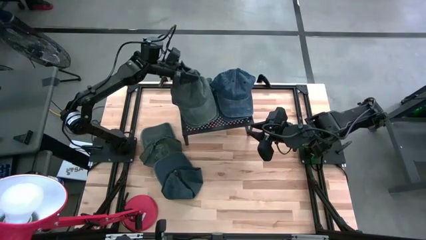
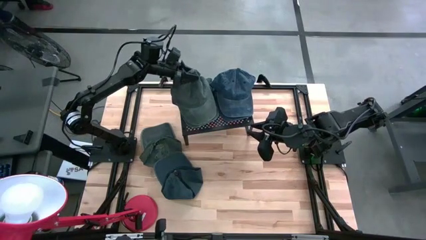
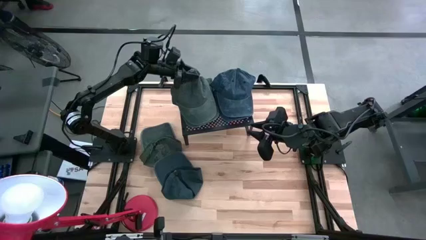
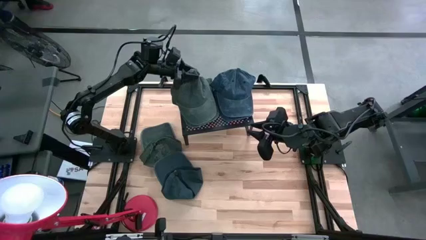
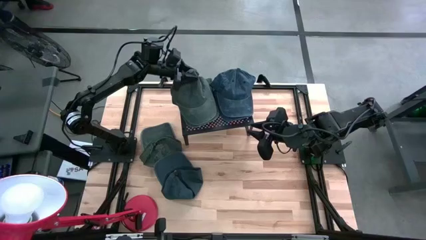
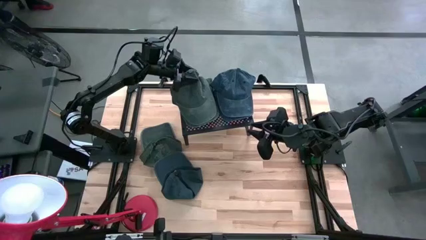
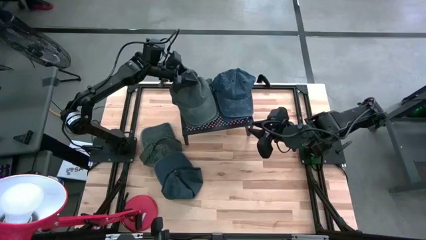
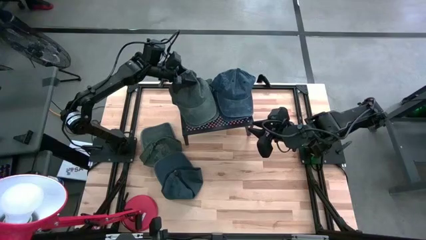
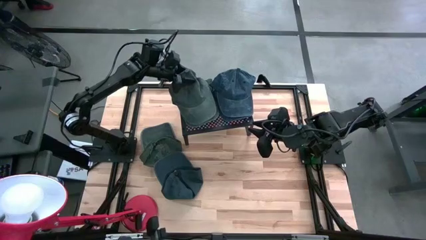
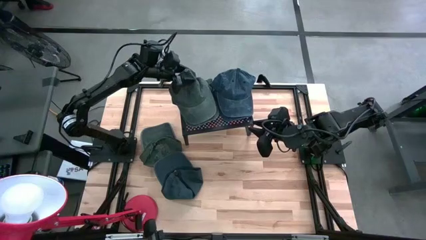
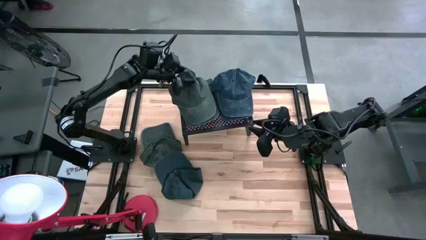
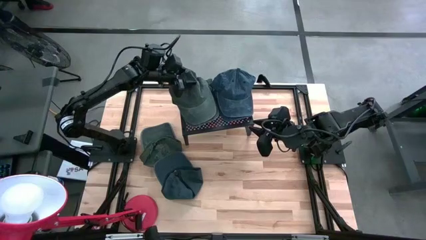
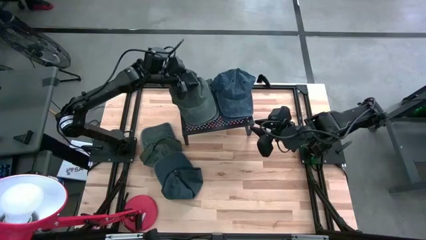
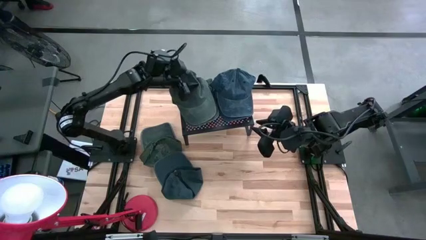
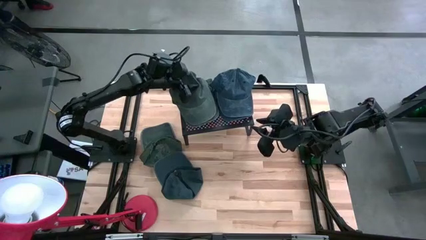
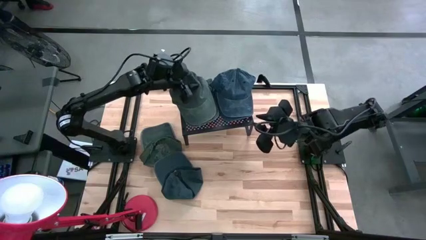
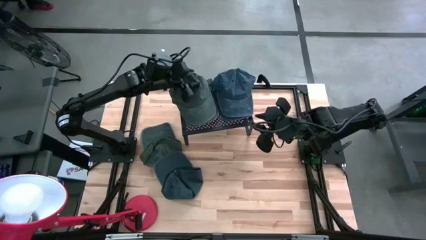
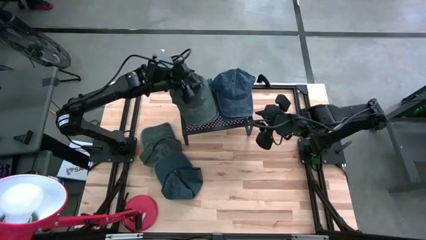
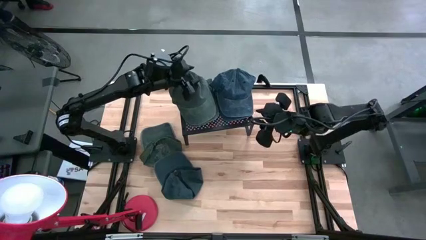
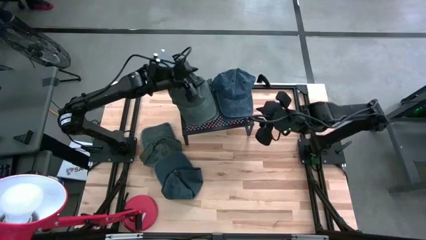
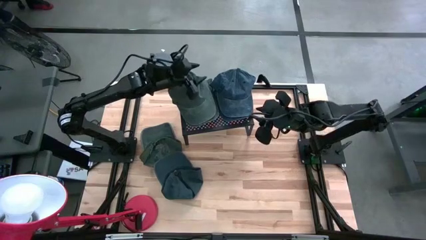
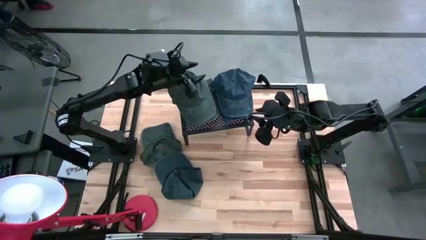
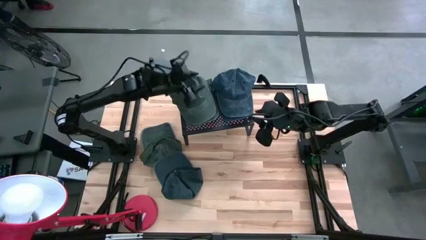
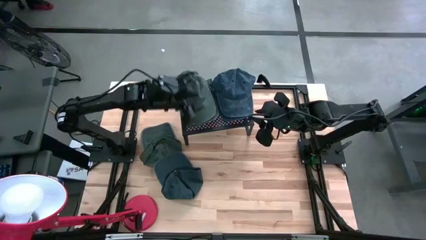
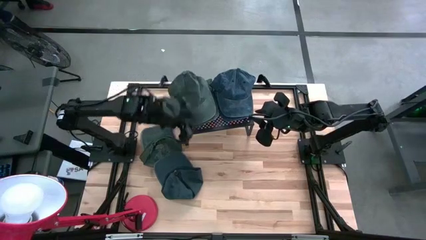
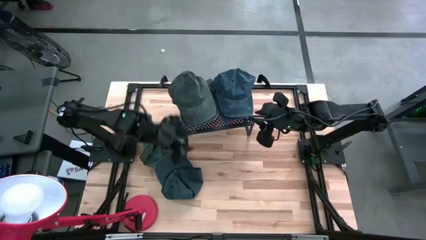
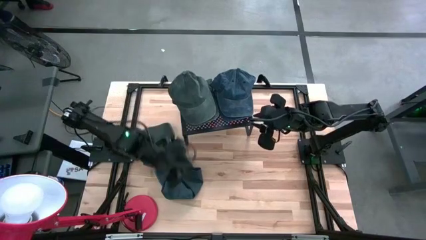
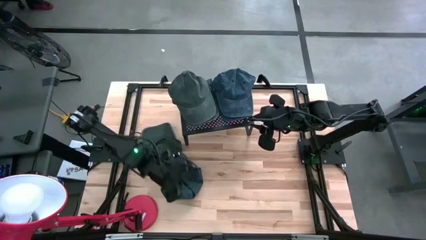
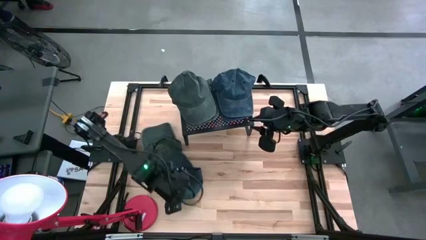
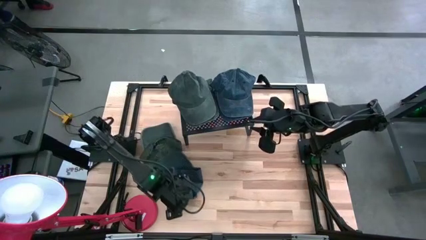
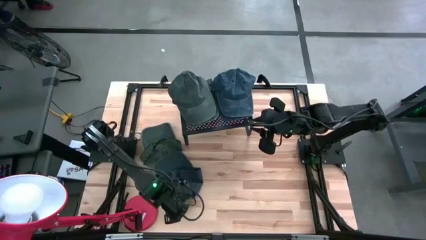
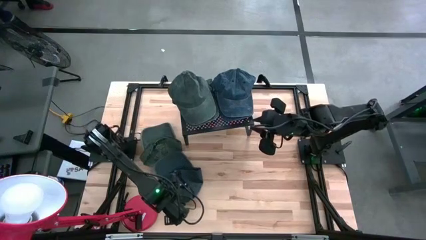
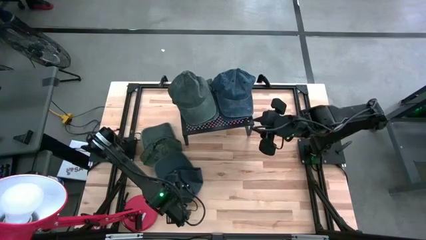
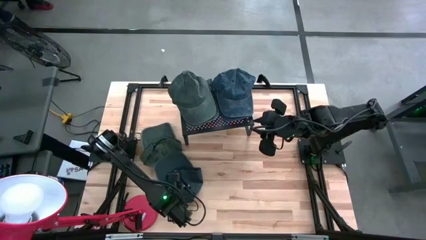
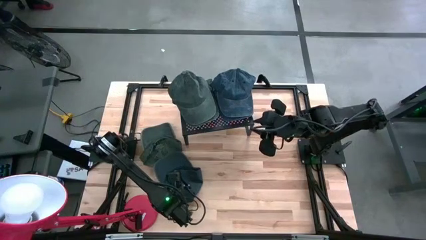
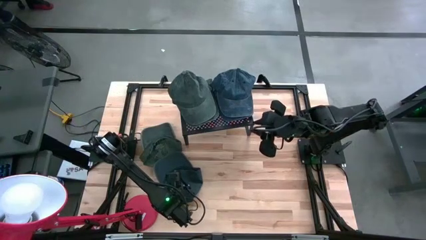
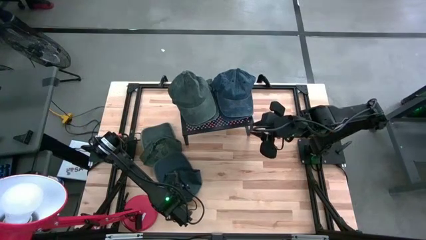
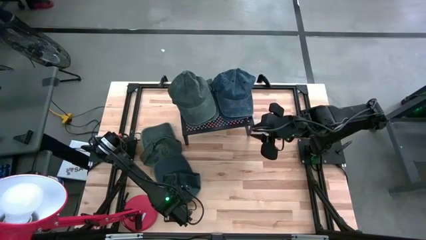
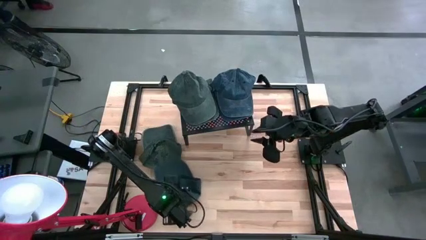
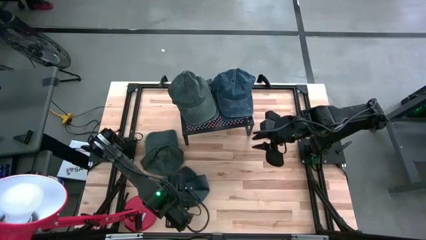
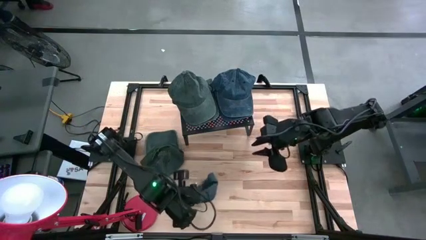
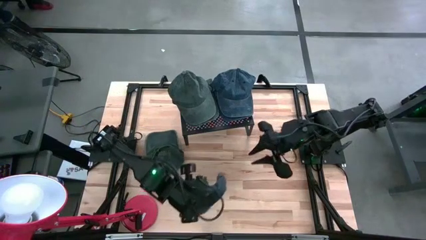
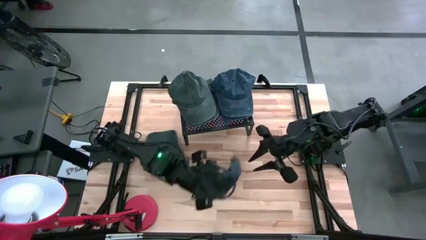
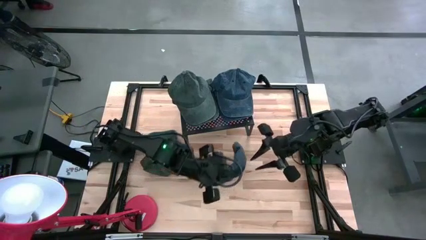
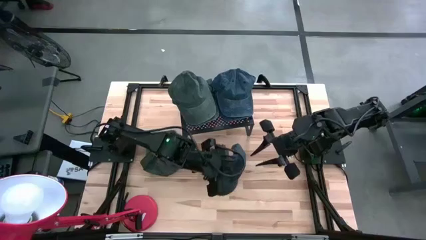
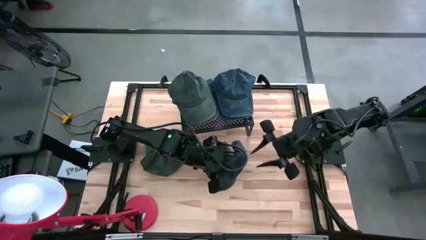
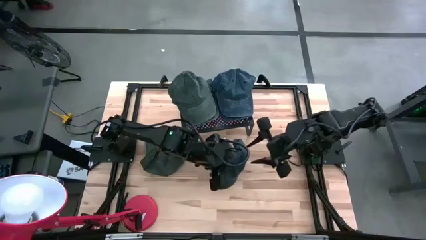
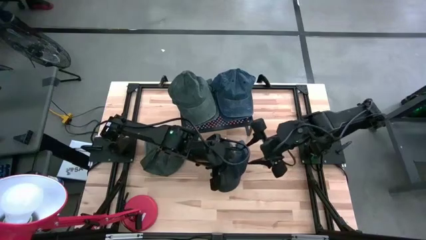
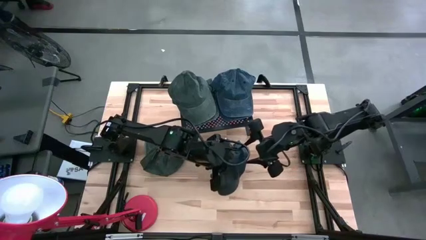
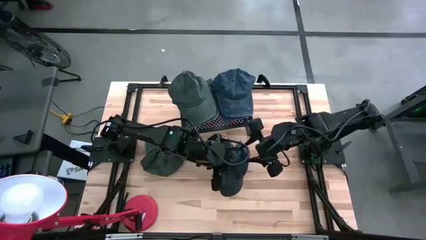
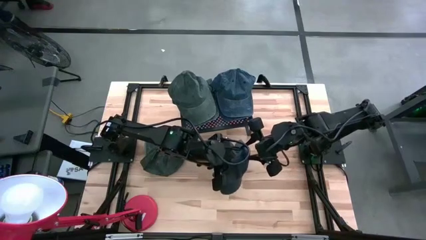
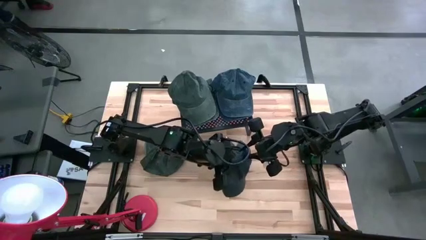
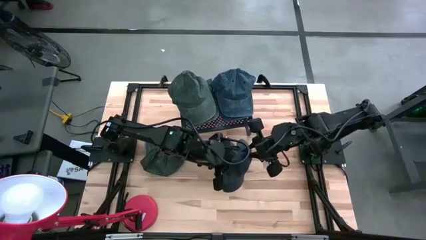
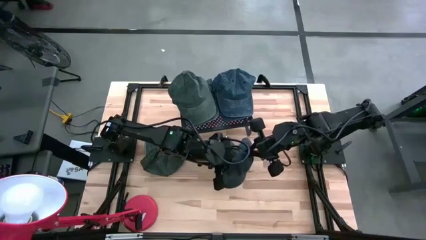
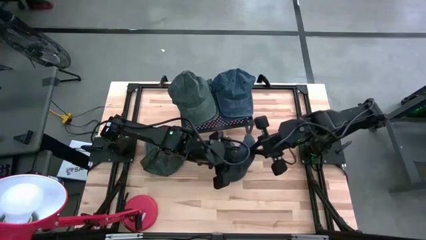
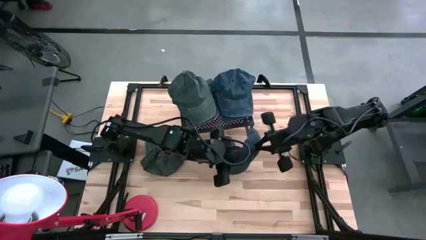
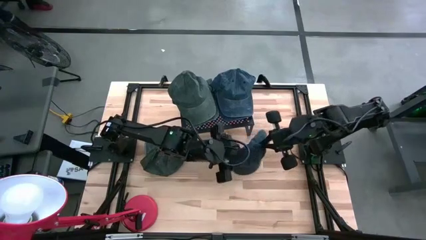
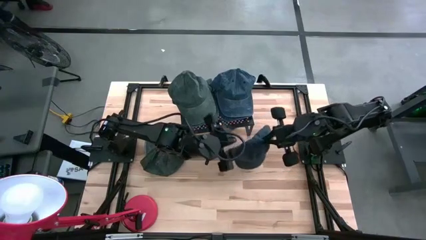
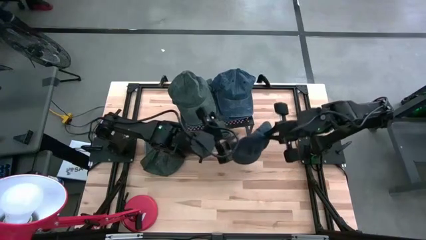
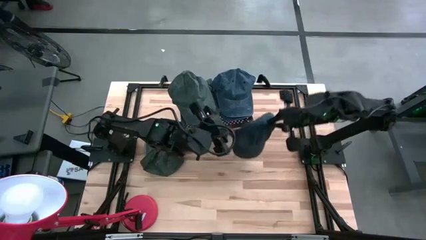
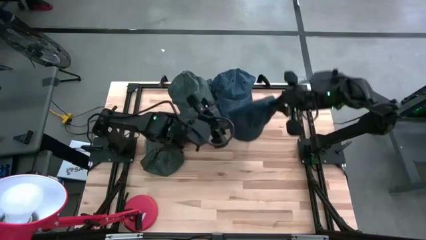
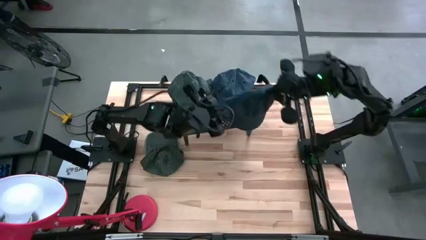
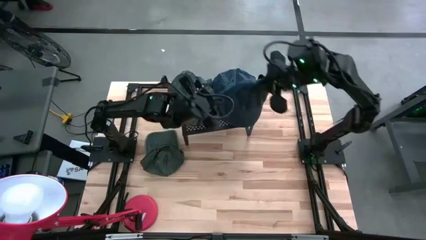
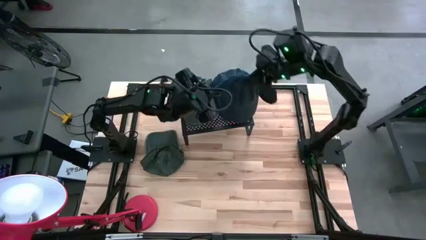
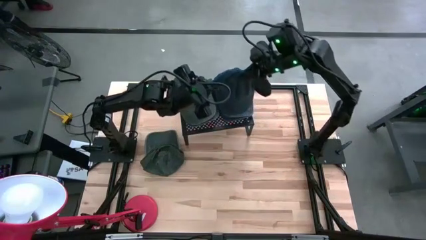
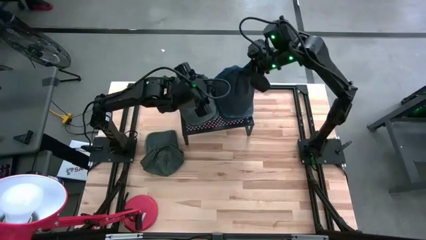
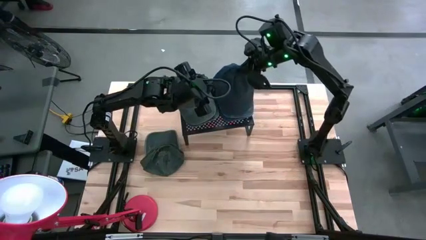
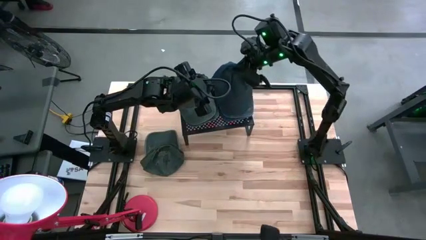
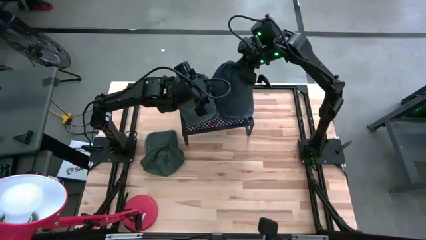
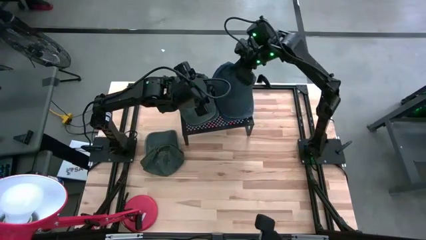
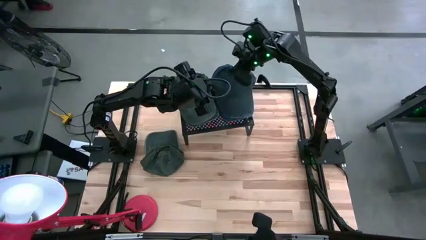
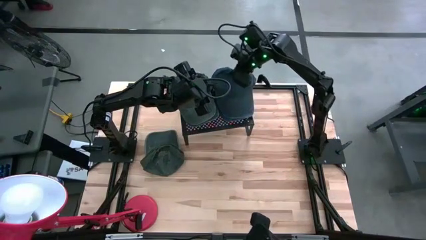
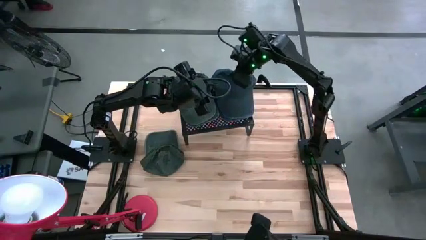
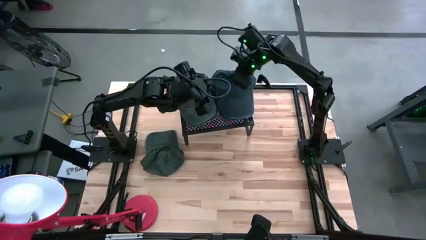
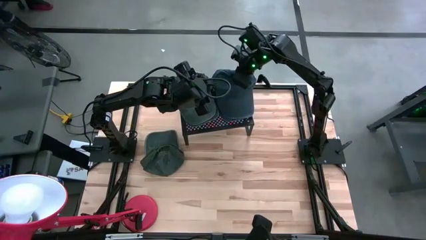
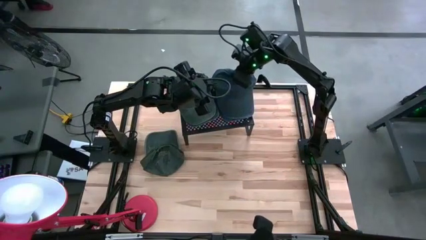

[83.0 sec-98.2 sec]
Task: Pick & Place hat
Stack the dark blue cap on top of the dark blue cap on the shelf

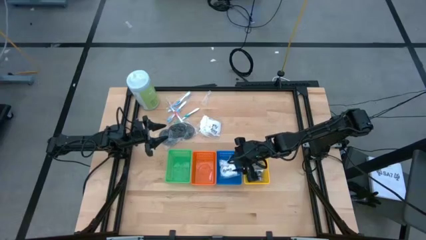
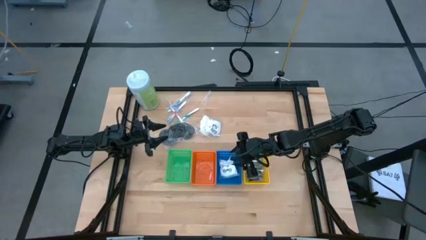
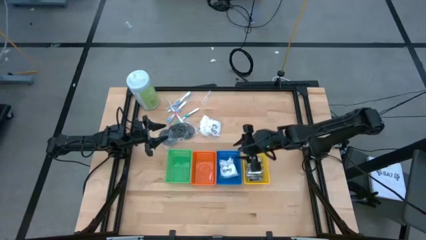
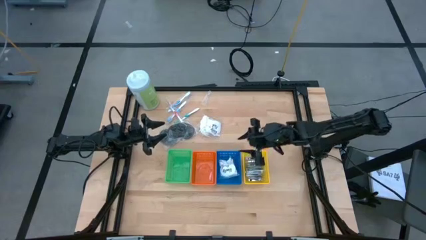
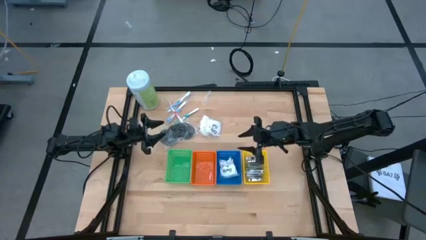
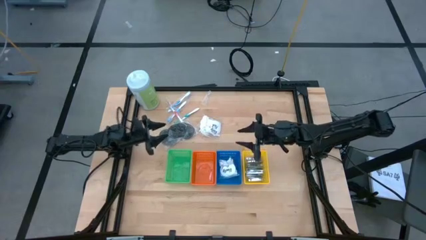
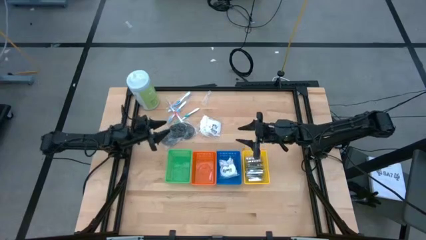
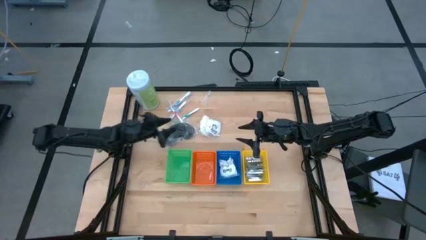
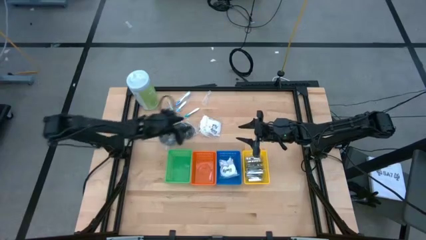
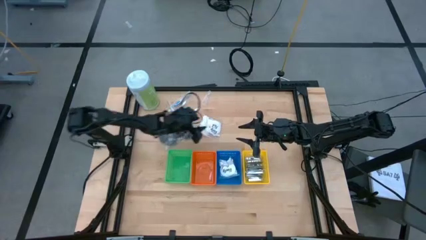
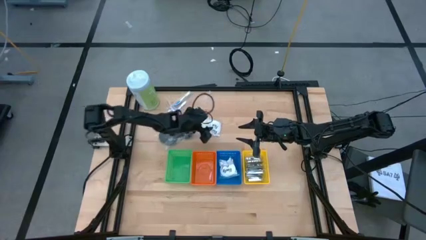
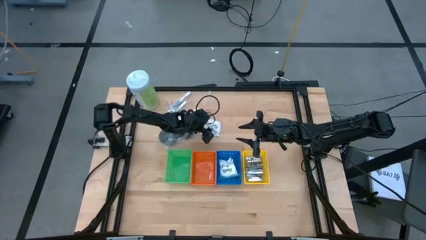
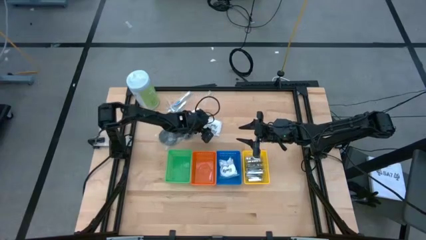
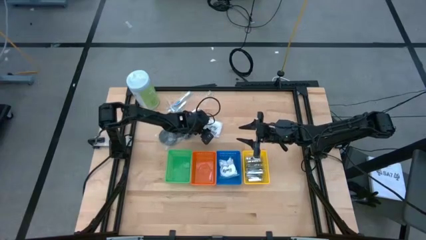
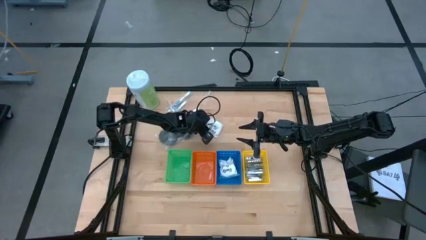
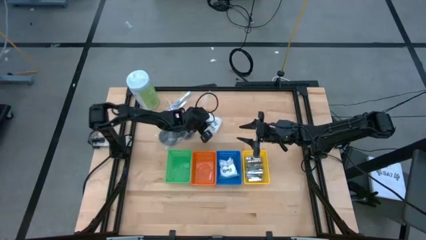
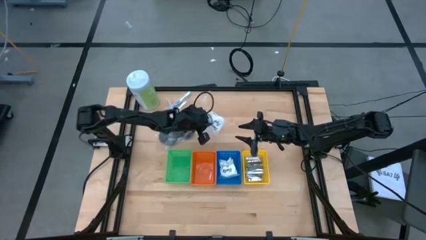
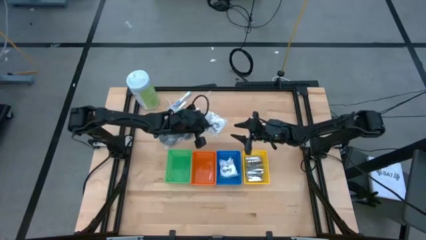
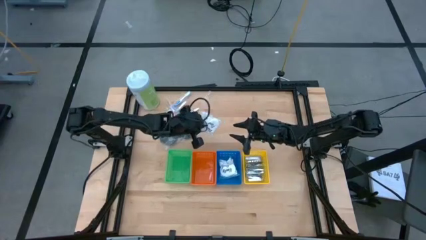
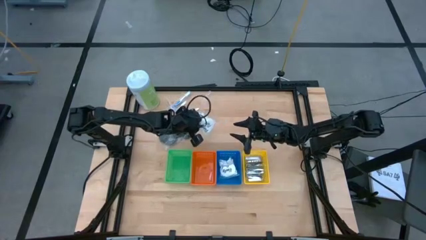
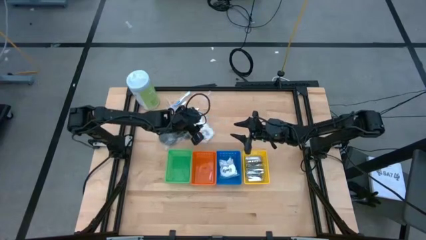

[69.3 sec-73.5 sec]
Task: Pick & Place Travel size toiletries
Put the cotton pack into the blue basket
